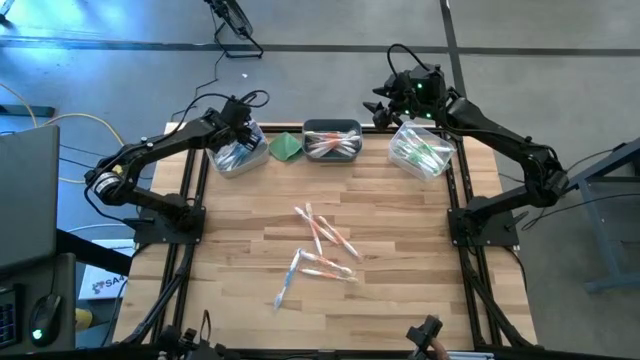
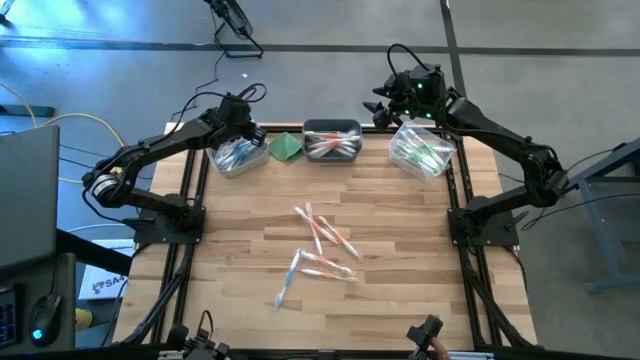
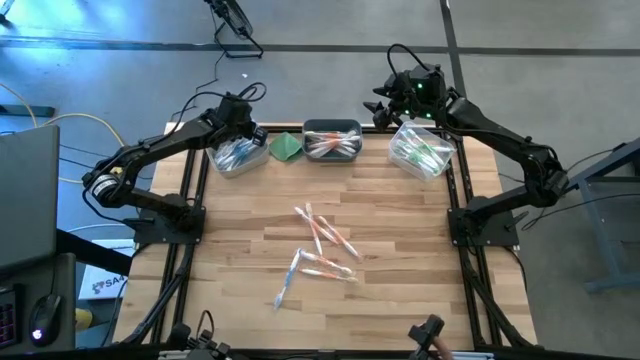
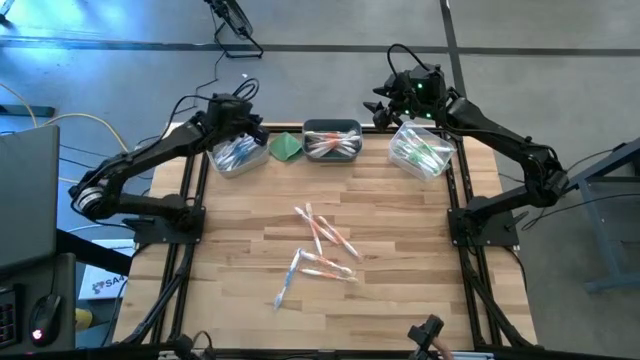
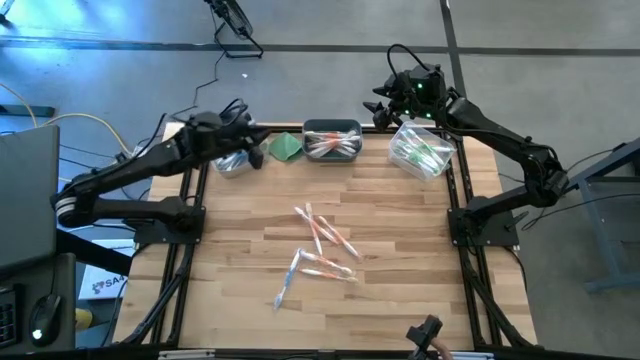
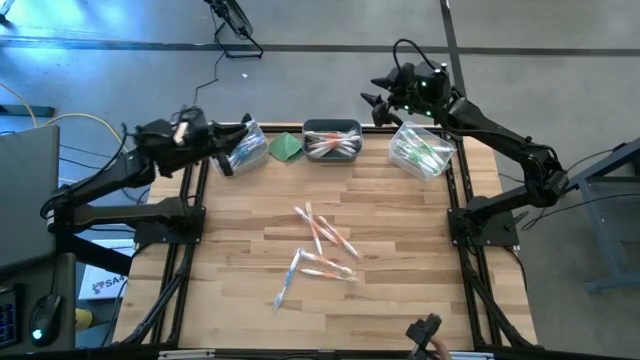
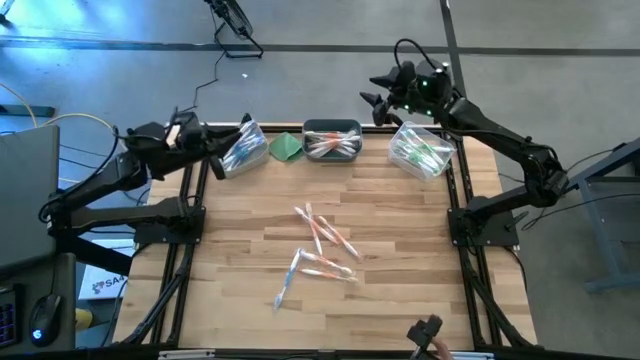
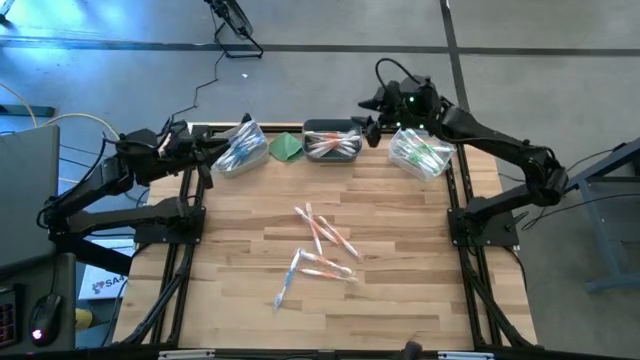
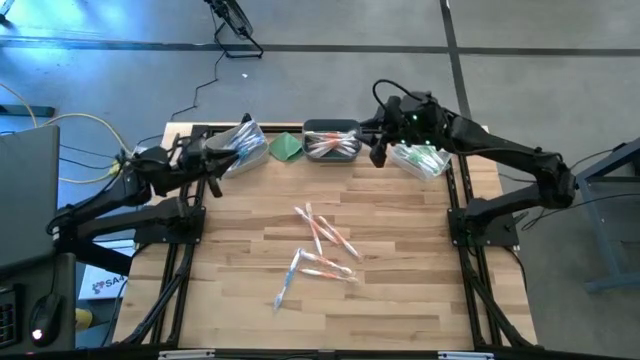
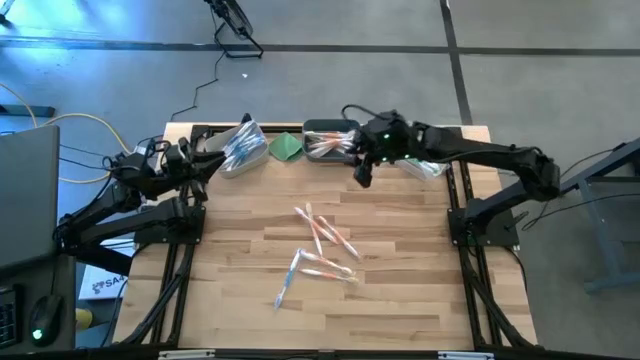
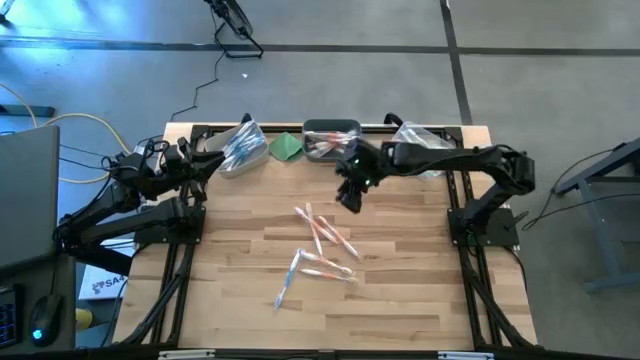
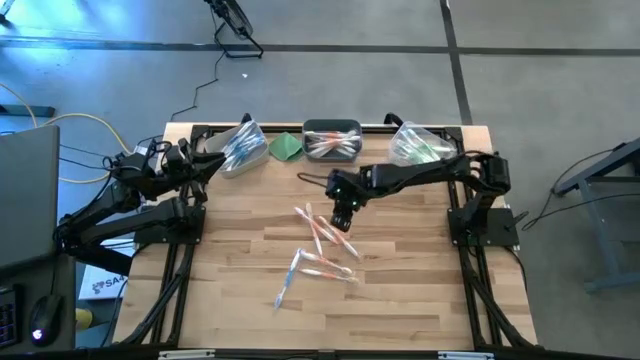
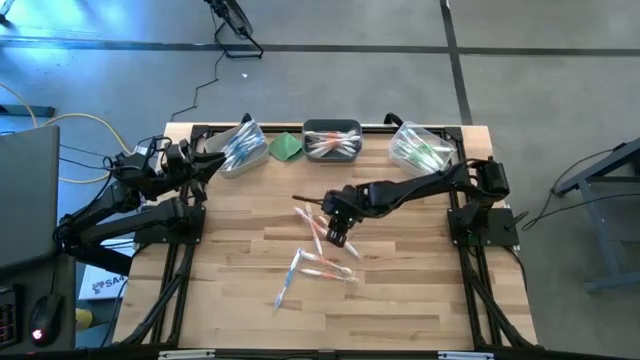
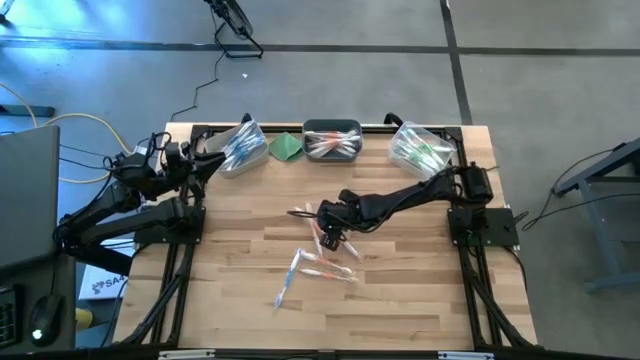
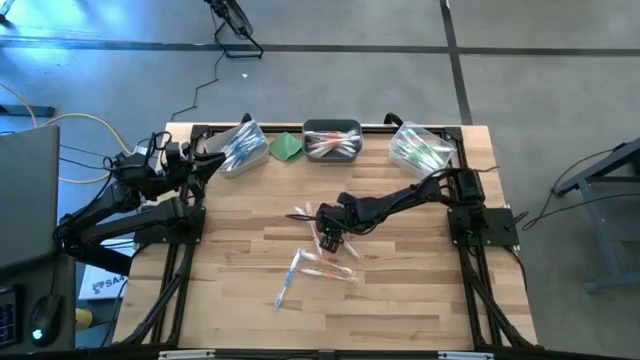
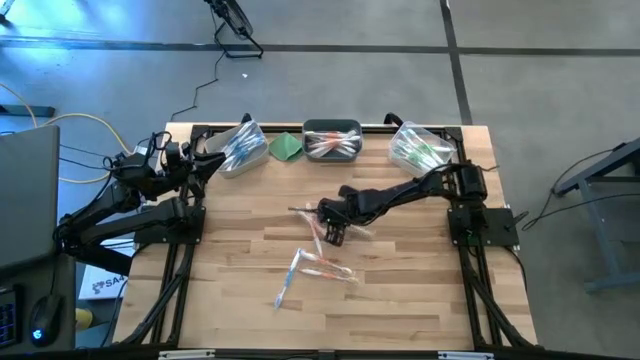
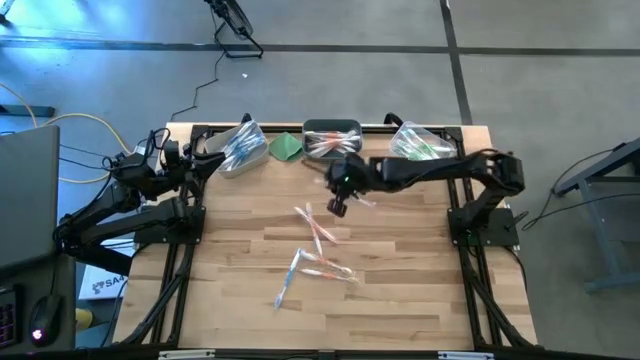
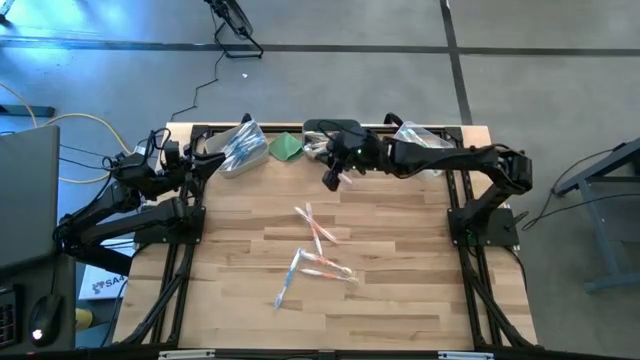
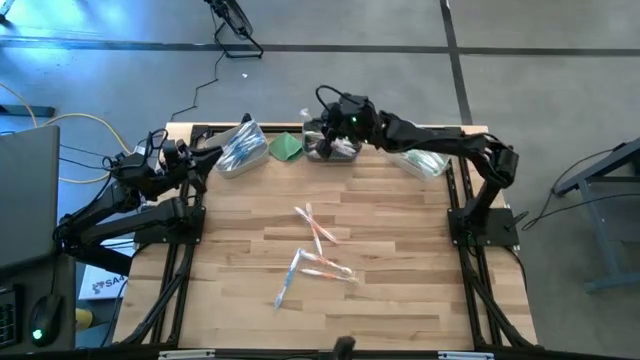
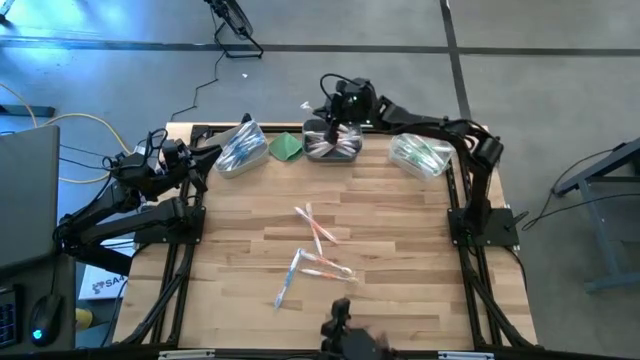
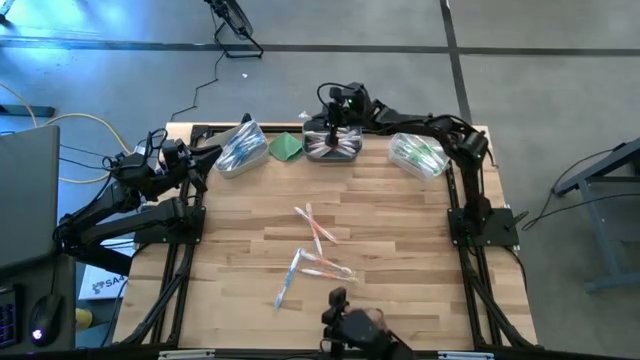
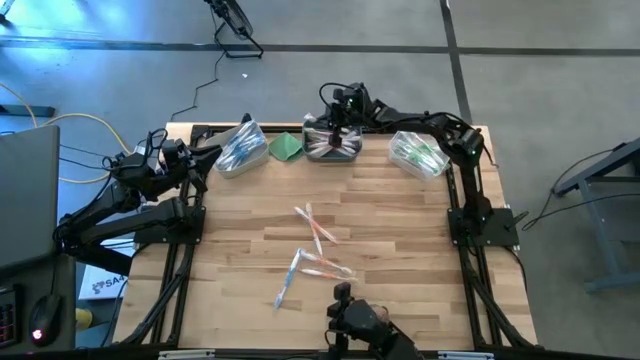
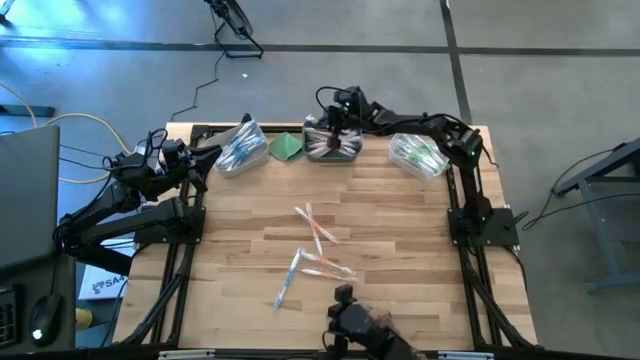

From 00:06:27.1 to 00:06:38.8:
Task: Pick & Place Toothbrushes
Put the orange toothbrush into the blue bin

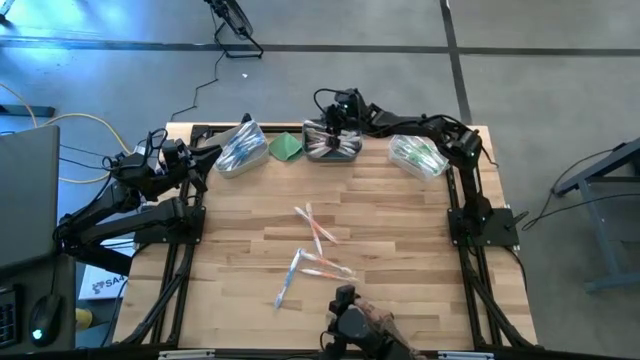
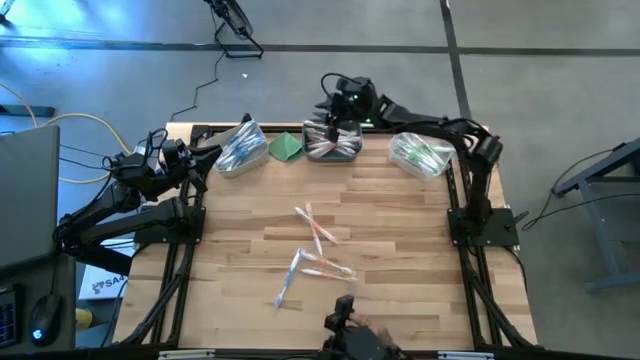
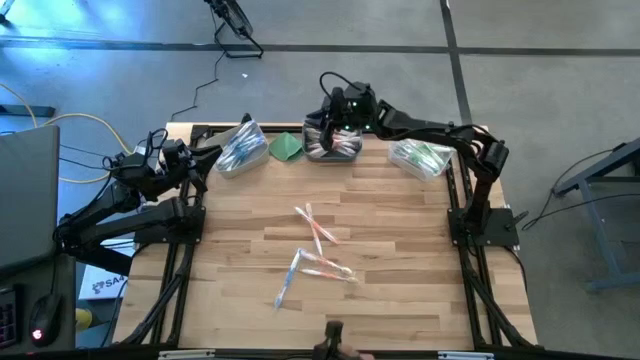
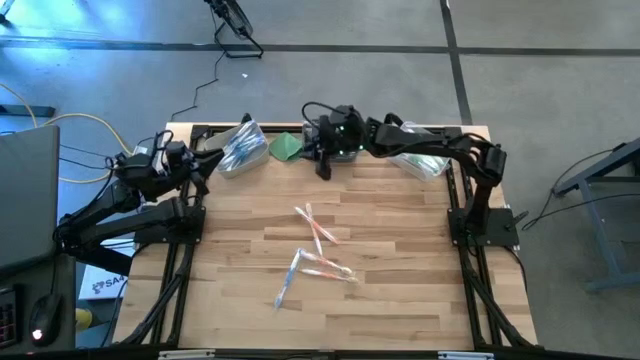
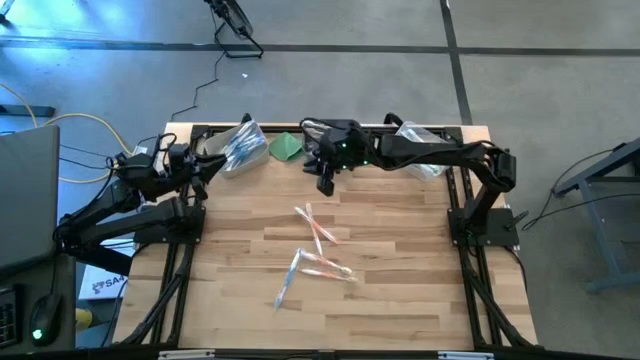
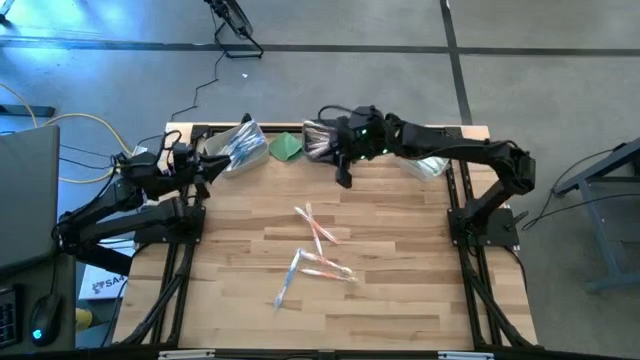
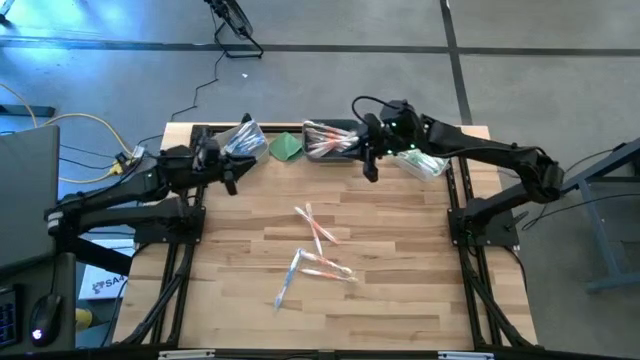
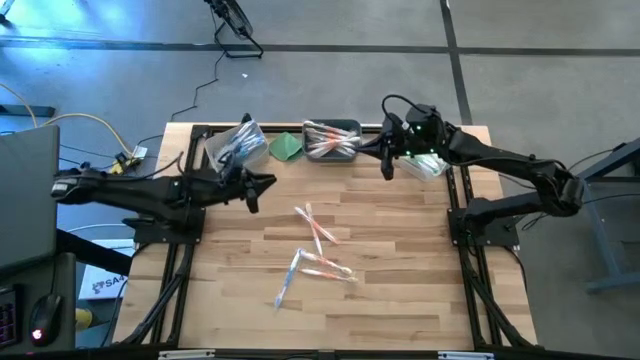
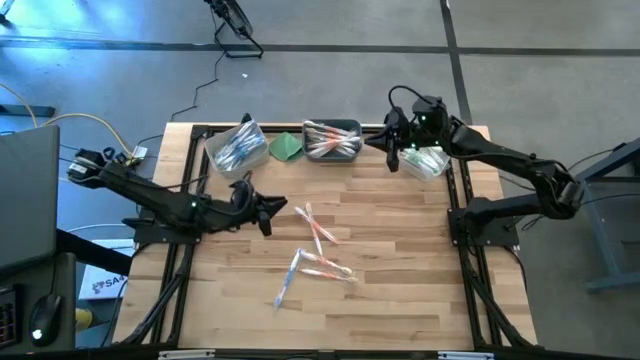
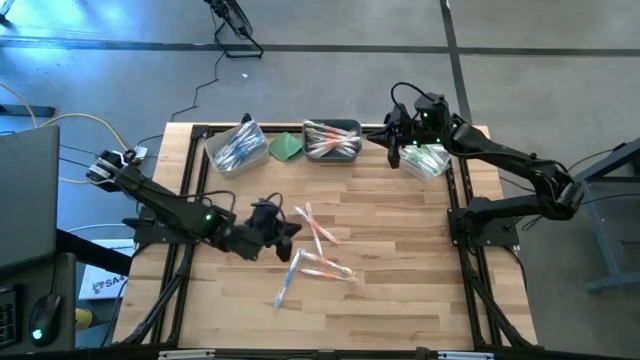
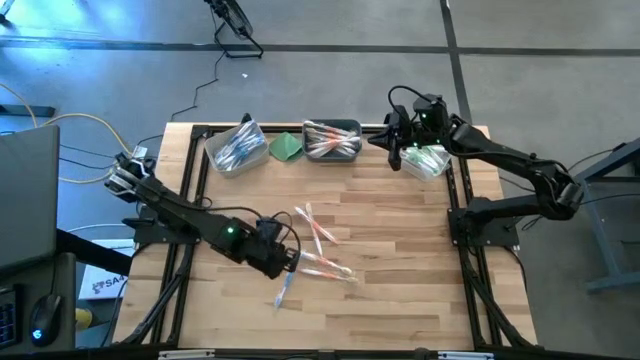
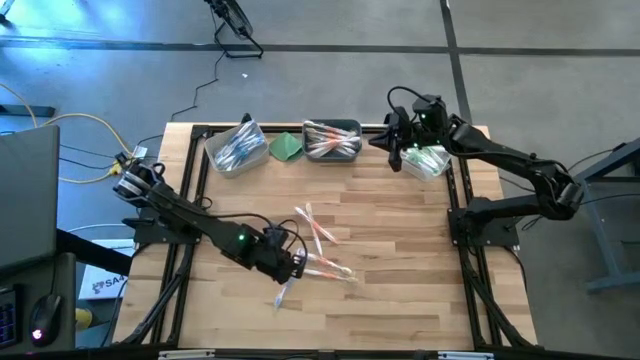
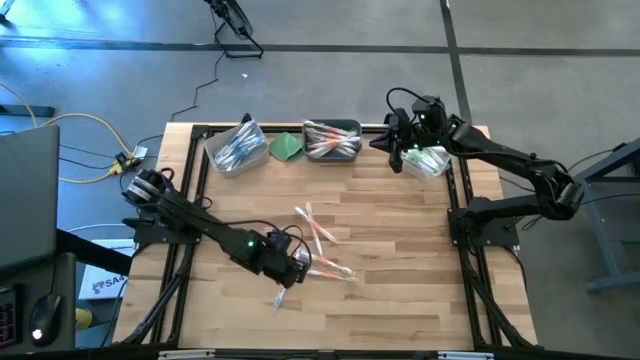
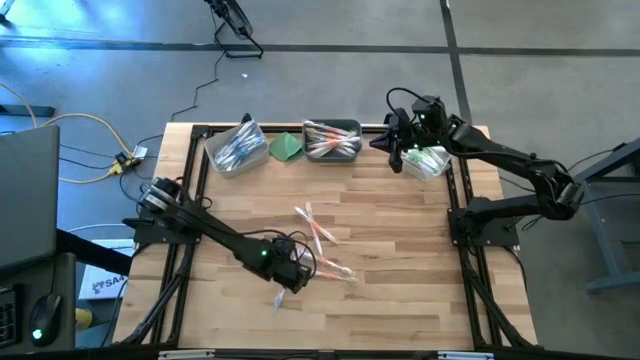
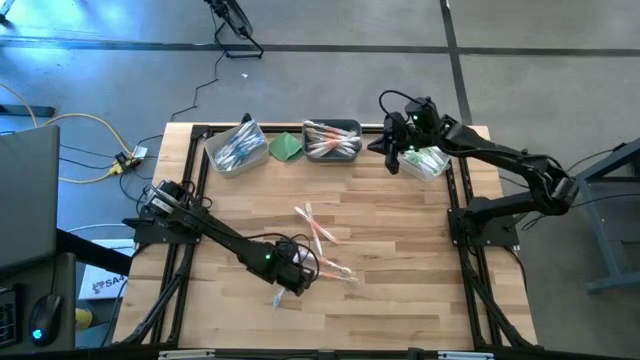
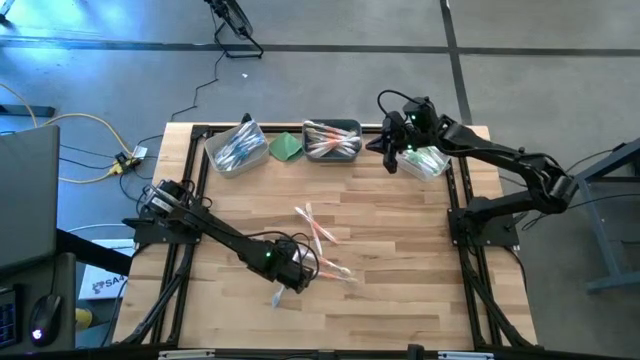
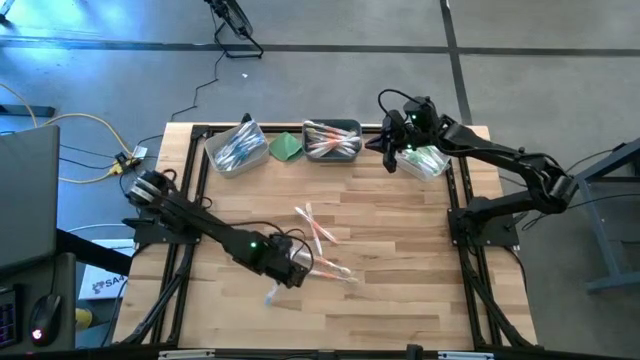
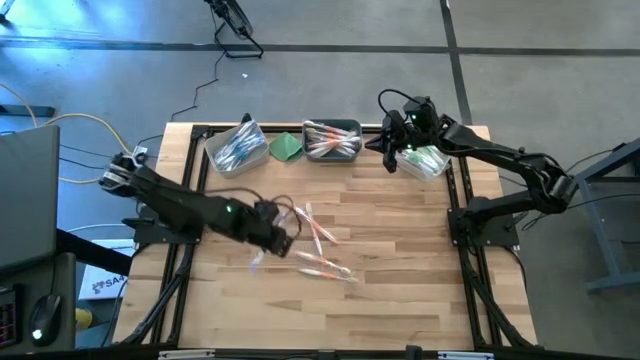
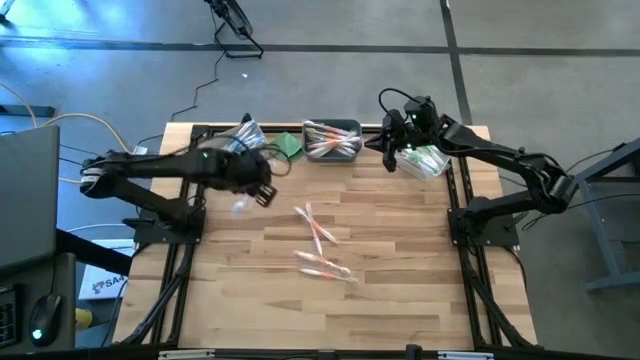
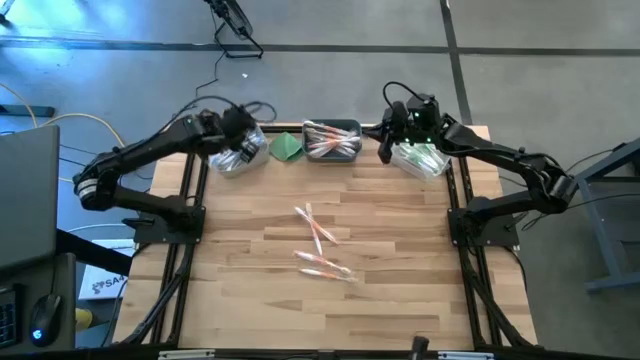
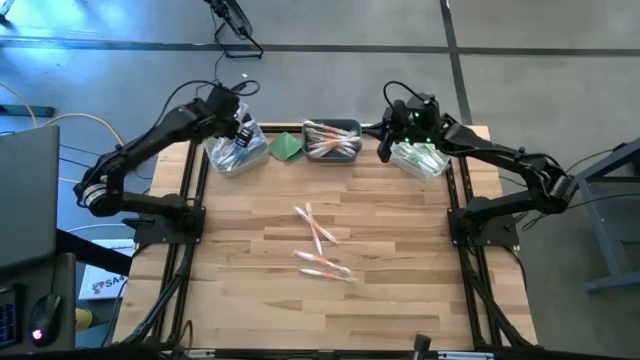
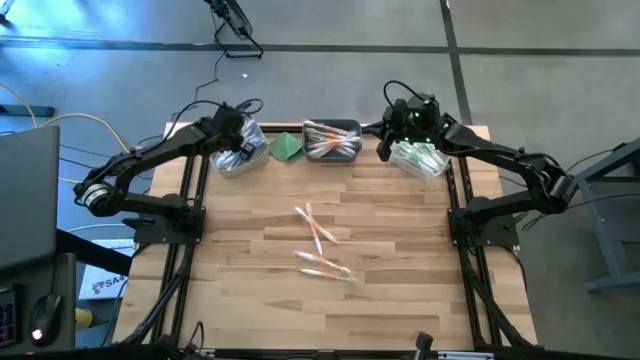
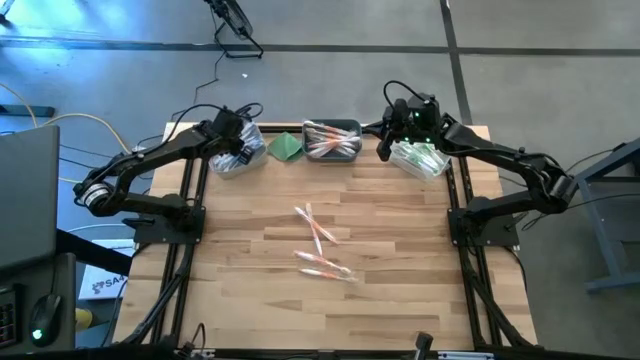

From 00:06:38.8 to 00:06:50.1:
Put the blue toothbrush into the gray bin
